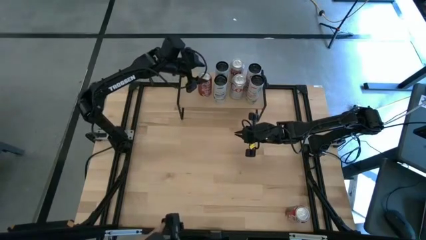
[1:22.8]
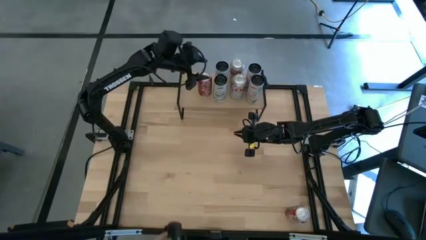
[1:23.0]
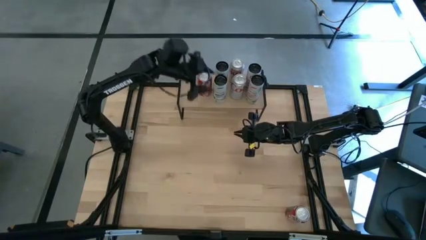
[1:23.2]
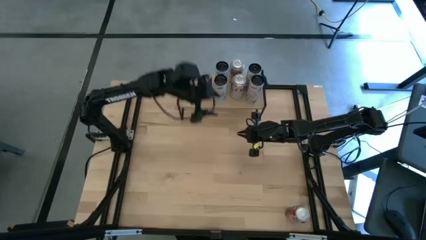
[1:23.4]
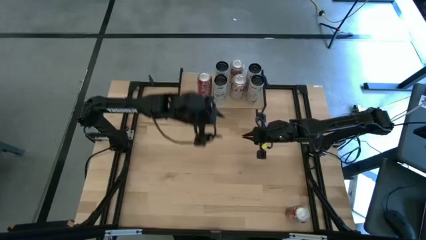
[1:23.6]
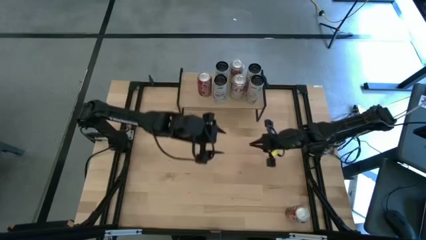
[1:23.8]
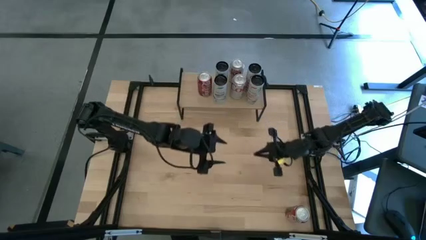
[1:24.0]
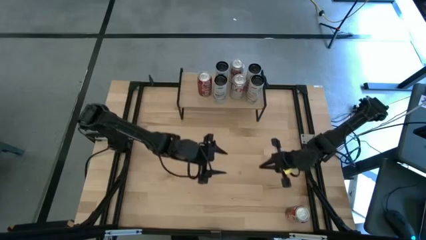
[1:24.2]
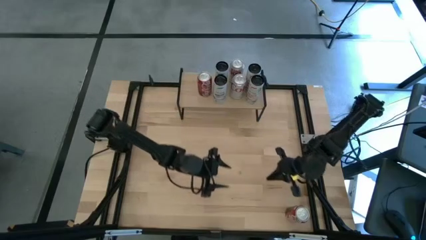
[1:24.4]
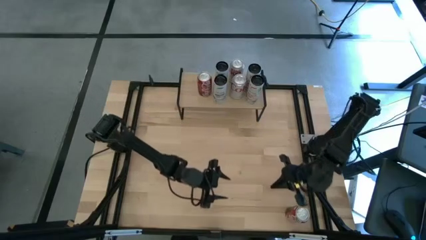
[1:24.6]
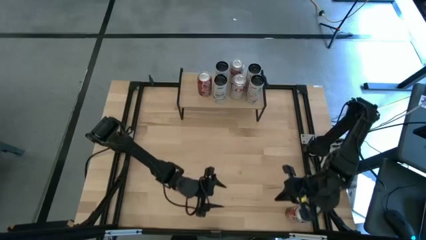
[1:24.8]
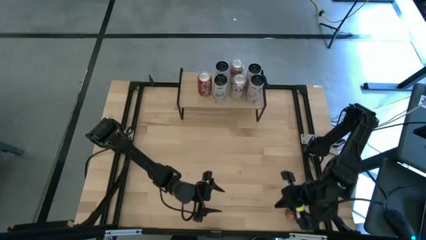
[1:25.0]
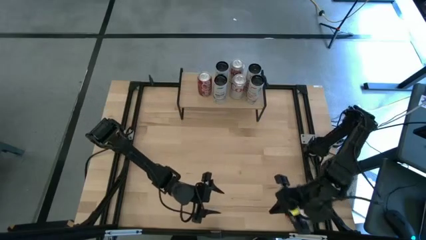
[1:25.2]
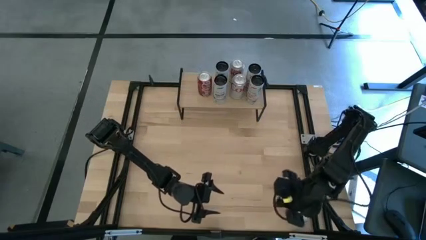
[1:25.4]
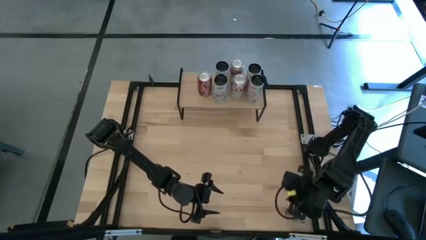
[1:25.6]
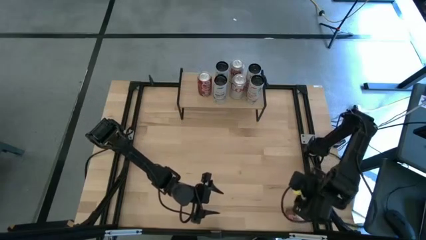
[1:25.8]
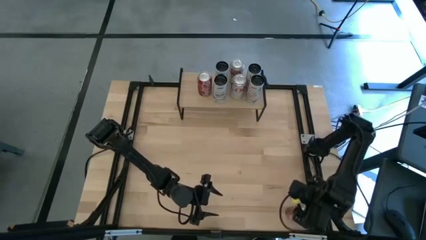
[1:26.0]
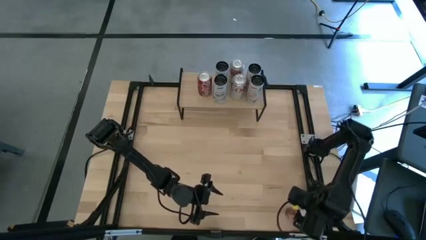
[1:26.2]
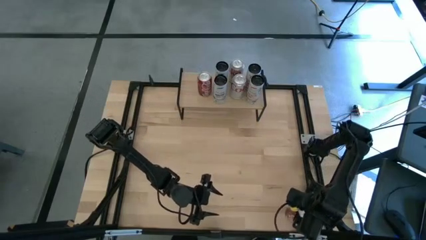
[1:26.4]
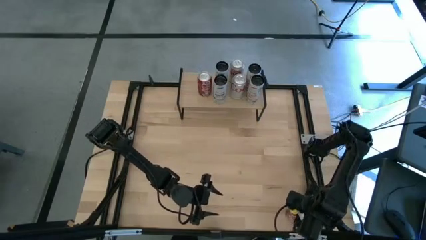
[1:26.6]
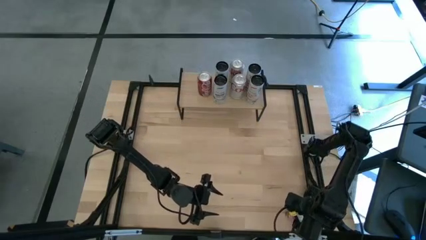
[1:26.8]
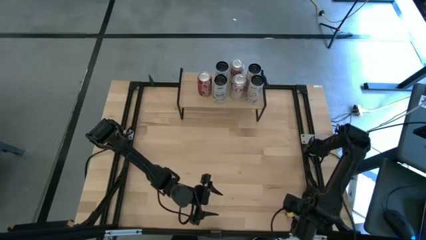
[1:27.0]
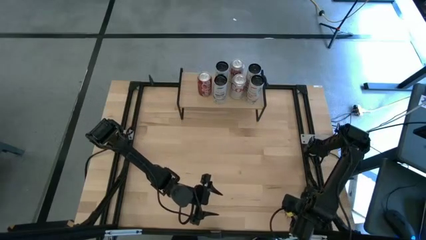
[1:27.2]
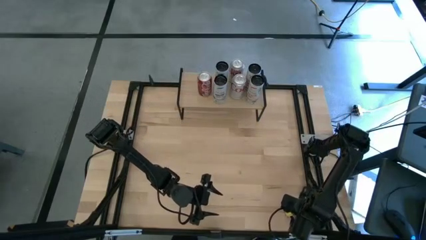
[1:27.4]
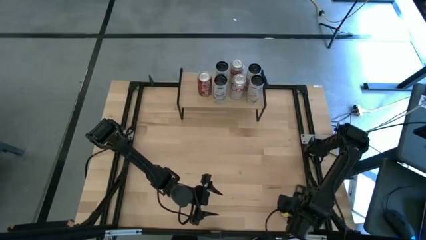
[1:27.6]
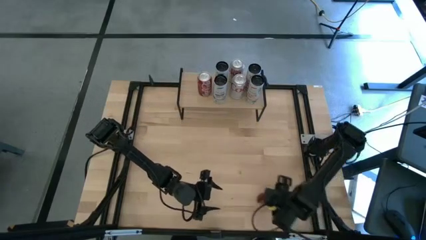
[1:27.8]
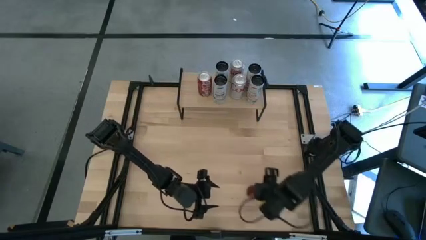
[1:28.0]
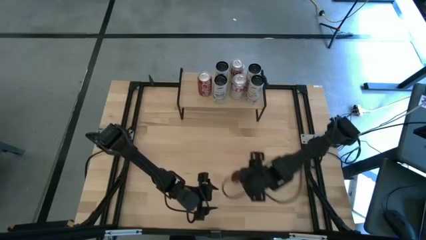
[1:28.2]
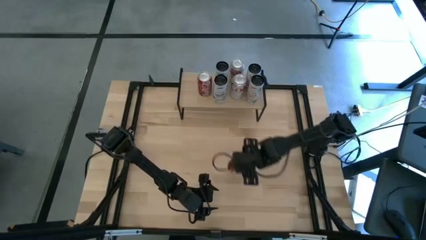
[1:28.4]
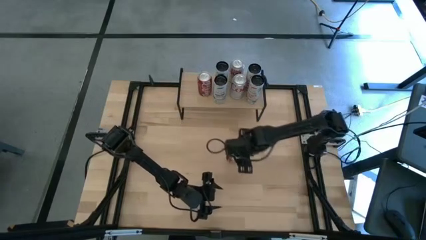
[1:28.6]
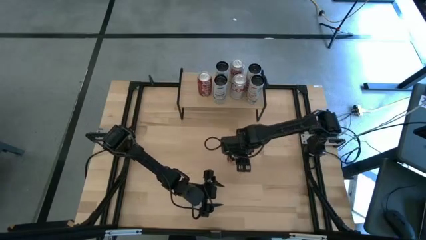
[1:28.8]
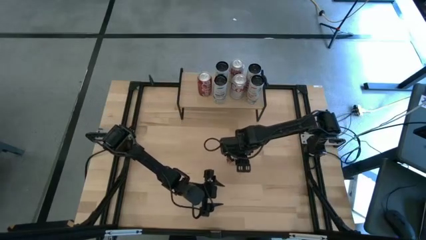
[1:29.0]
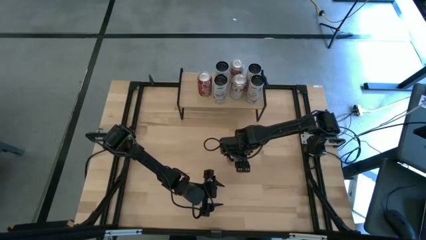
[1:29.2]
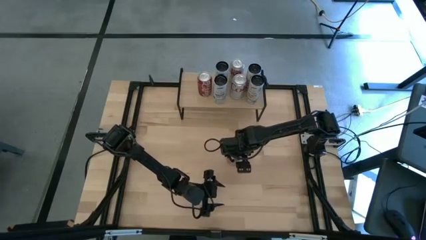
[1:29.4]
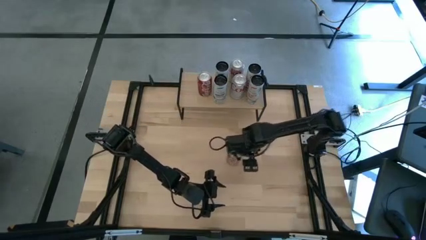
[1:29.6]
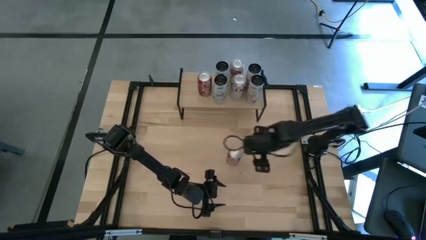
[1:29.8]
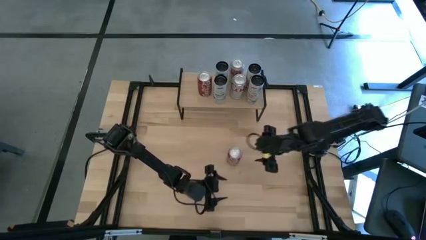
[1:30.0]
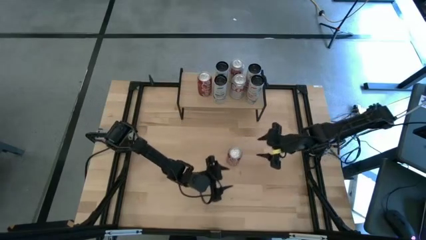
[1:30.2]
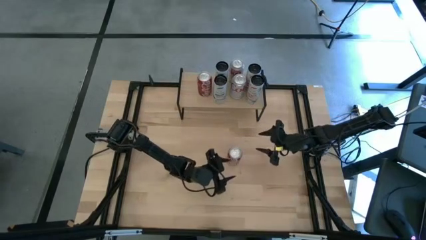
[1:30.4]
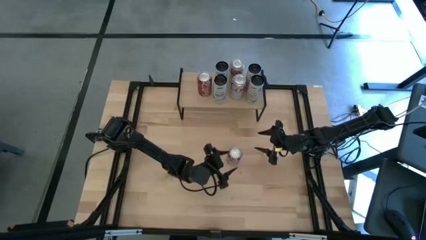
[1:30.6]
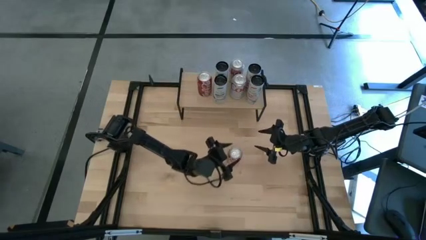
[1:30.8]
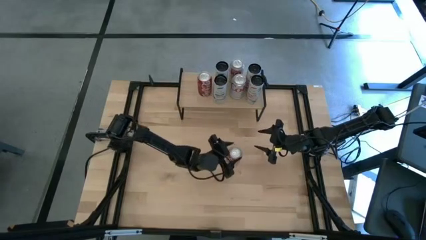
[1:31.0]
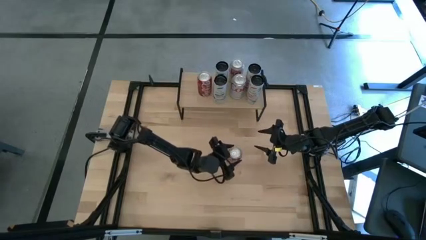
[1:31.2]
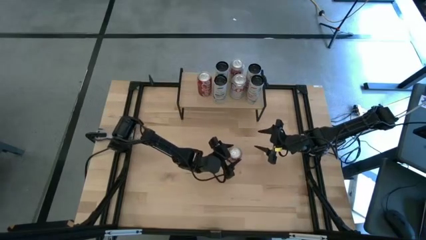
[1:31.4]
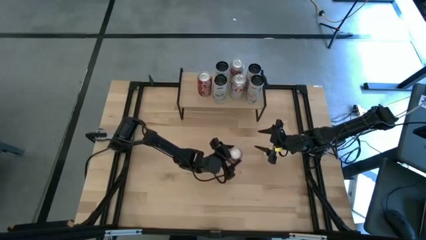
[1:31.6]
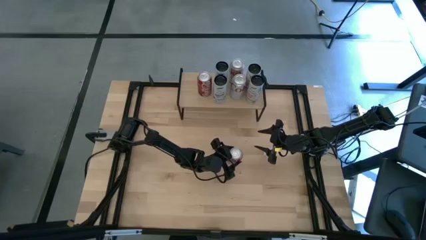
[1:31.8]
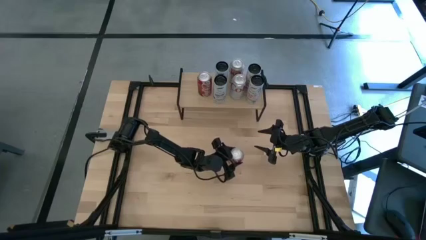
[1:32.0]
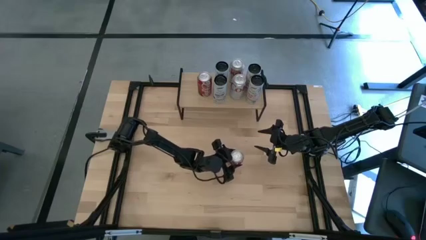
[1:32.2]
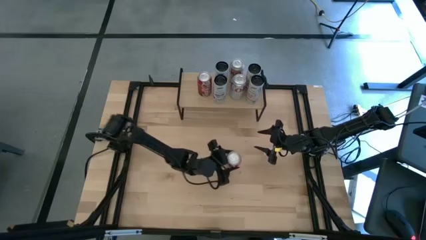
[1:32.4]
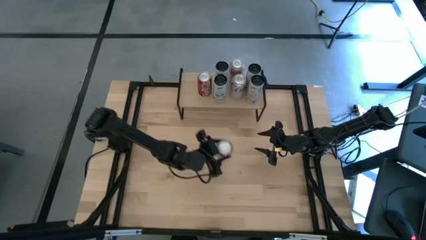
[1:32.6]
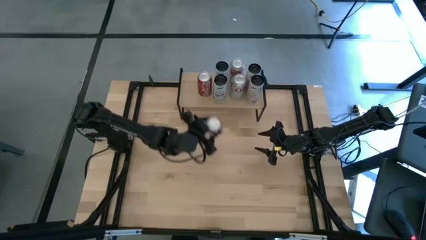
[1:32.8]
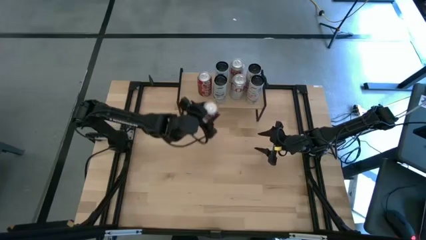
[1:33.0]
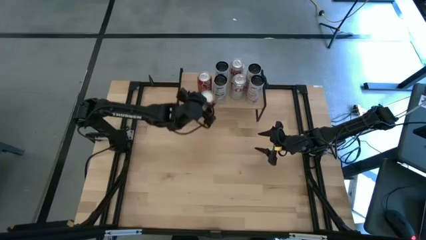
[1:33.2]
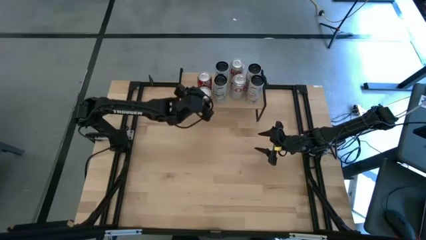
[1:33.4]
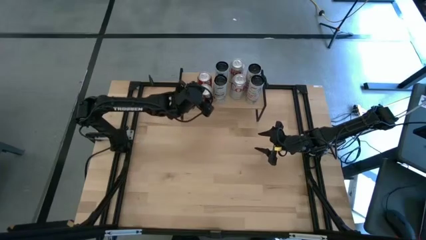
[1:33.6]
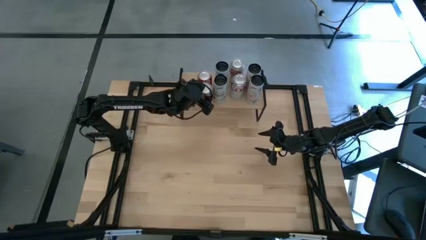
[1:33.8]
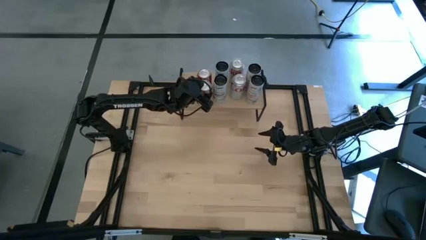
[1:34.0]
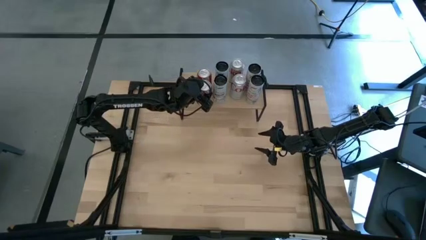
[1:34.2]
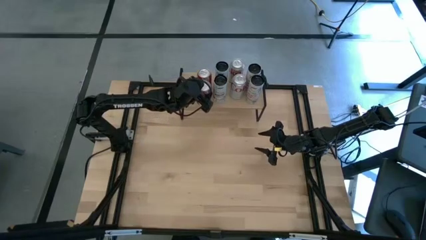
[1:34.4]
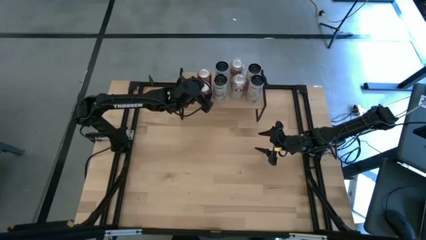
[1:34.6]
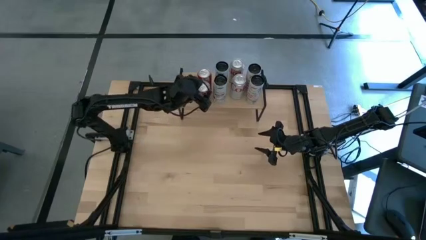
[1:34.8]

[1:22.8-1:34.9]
Task: Place canned beverage on shelf
Put the red-white soda can on the shelf aligned with the other red-white soda can

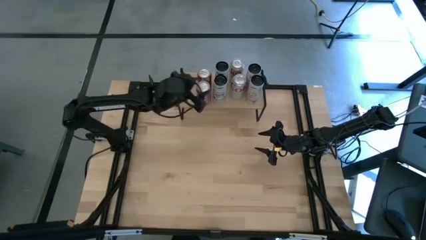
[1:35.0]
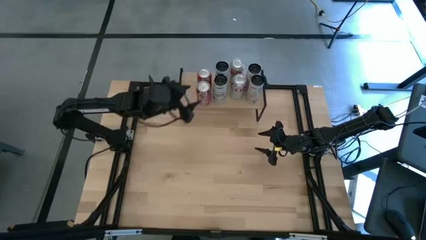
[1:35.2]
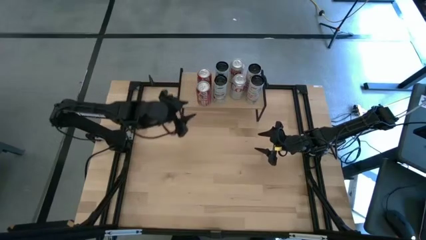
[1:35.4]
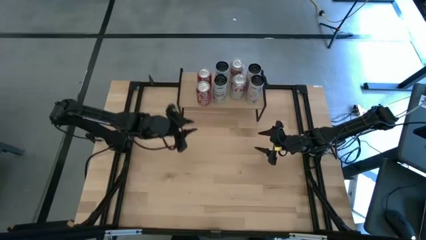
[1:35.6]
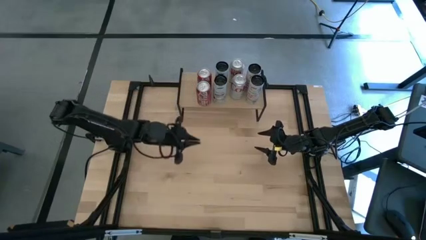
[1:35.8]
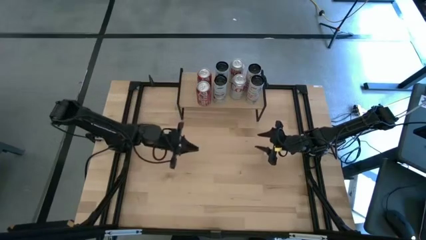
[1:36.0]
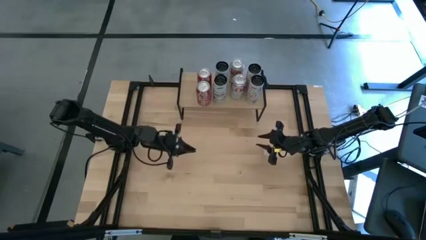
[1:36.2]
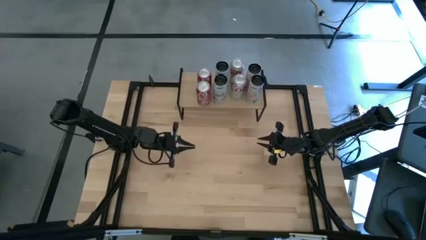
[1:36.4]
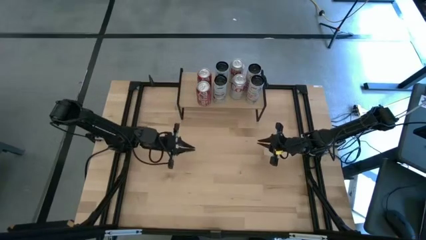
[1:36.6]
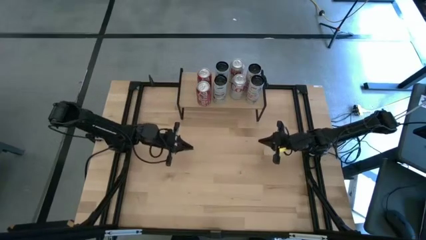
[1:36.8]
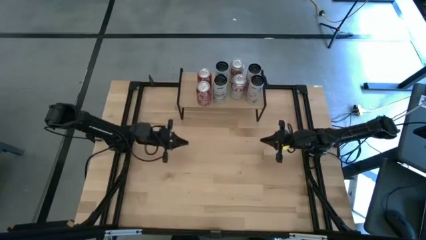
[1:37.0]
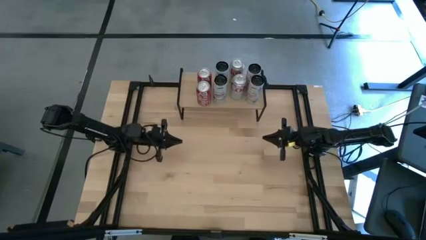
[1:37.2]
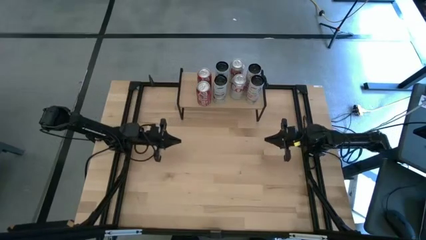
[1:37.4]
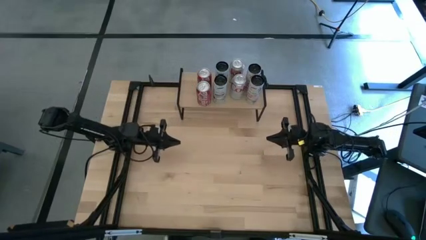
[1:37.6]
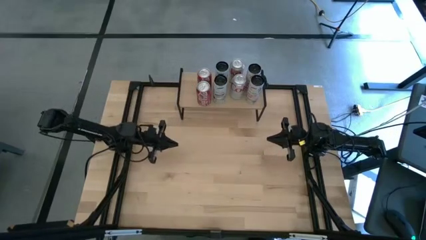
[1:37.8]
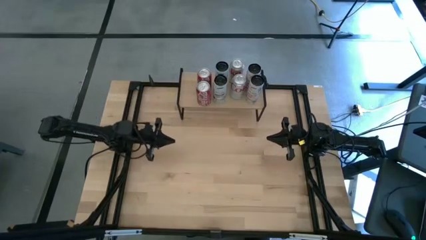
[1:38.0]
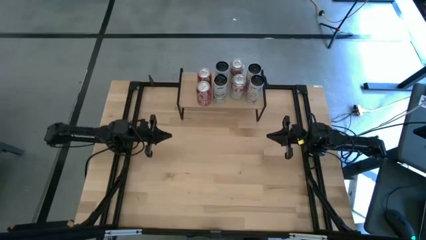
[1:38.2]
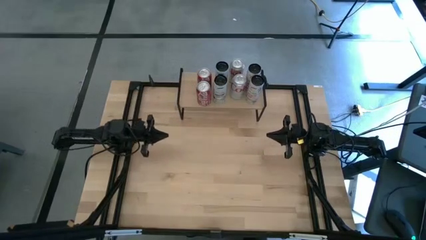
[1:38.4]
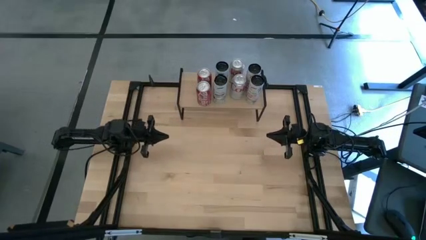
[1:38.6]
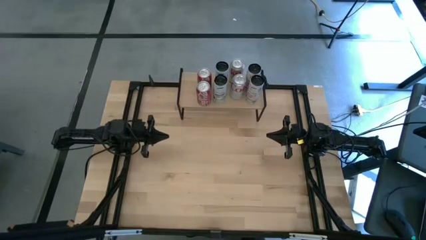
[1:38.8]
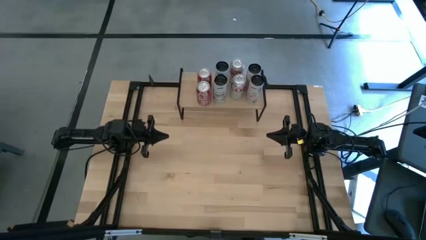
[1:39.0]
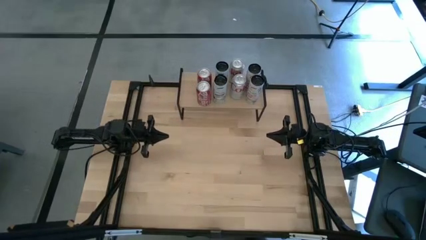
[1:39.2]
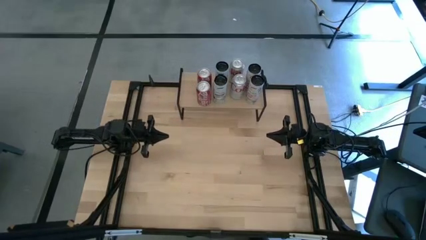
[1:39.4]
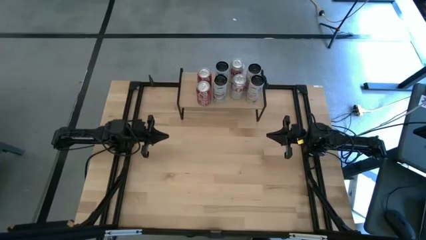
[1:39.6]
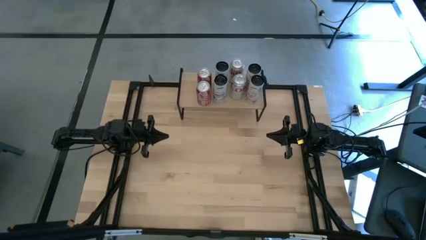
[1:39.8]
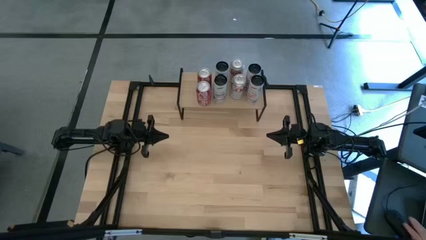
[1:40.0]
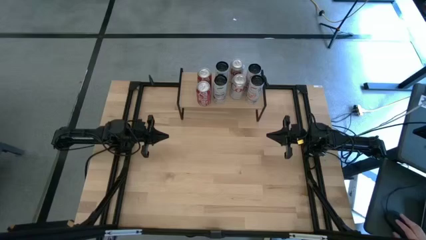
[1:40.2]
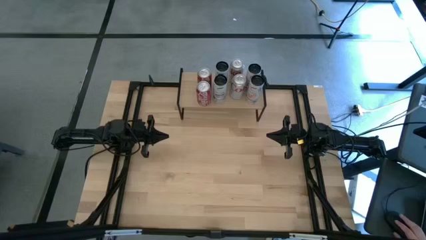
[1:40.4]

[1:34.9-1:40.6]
Return to Home Position
